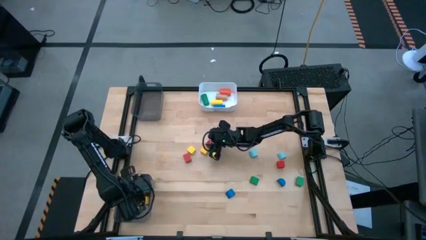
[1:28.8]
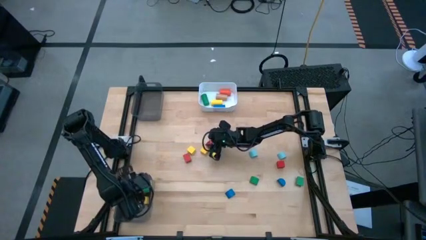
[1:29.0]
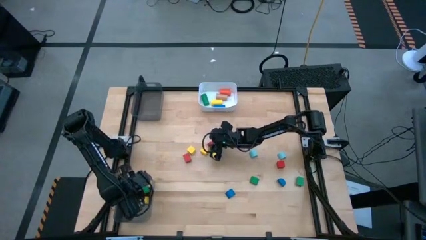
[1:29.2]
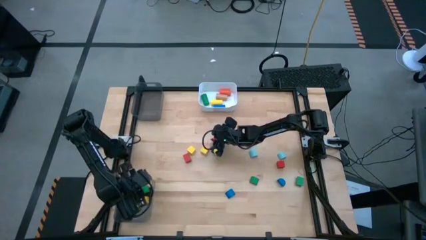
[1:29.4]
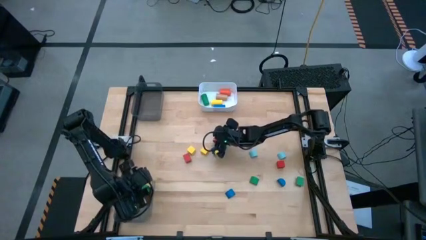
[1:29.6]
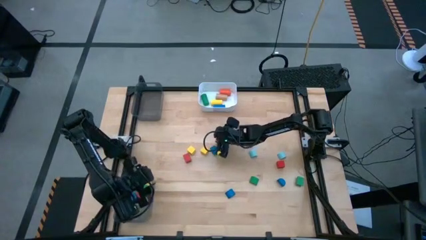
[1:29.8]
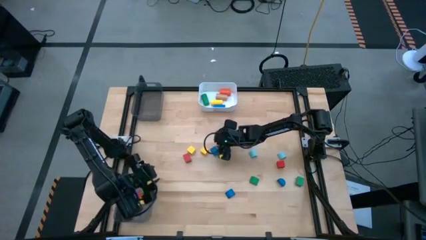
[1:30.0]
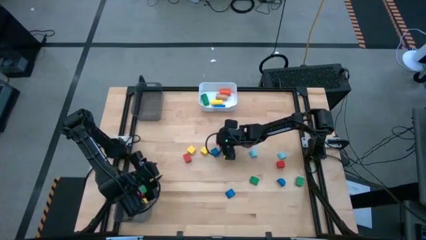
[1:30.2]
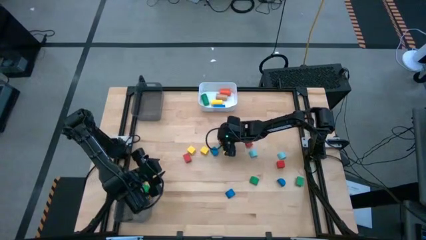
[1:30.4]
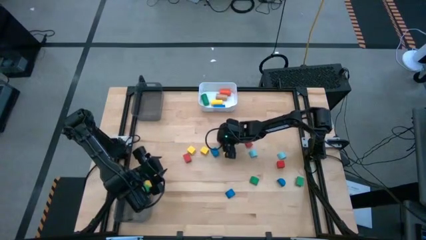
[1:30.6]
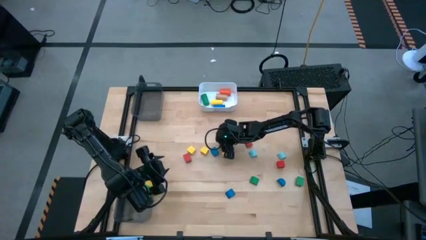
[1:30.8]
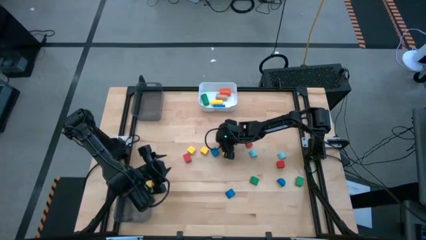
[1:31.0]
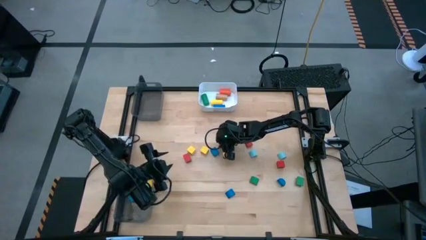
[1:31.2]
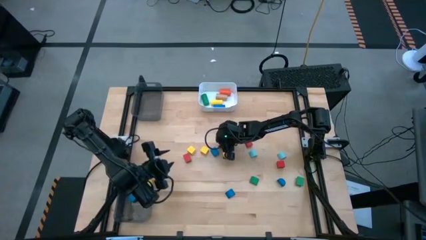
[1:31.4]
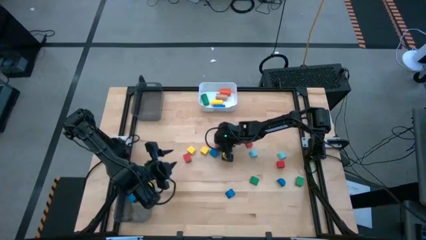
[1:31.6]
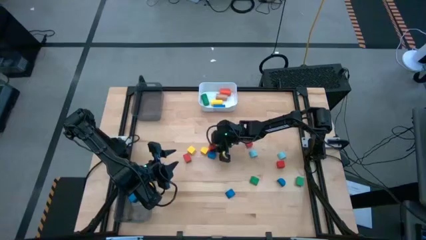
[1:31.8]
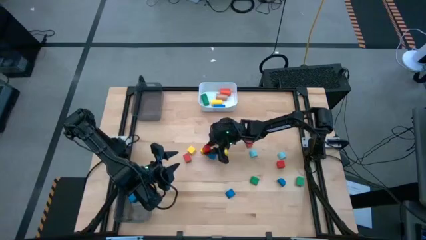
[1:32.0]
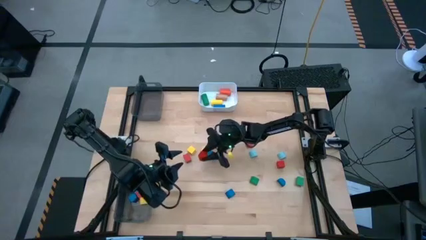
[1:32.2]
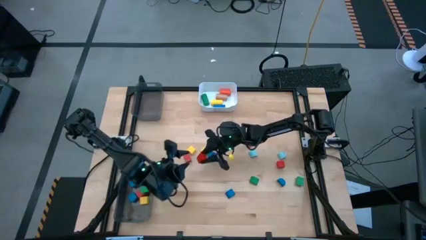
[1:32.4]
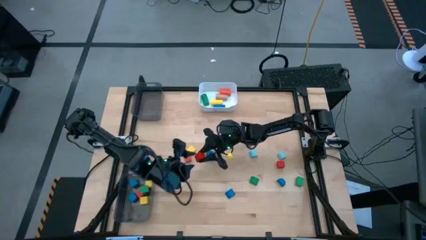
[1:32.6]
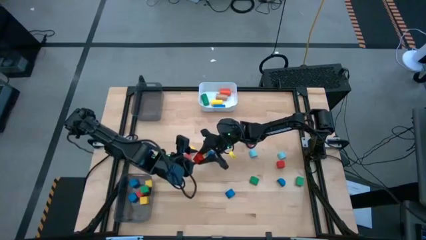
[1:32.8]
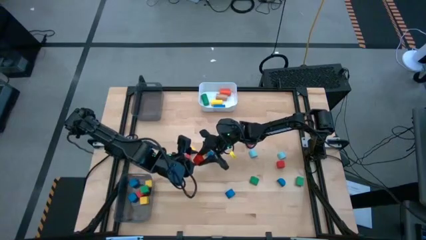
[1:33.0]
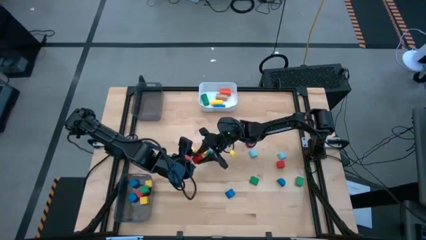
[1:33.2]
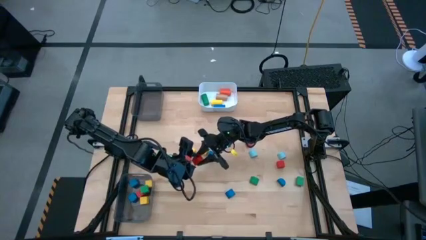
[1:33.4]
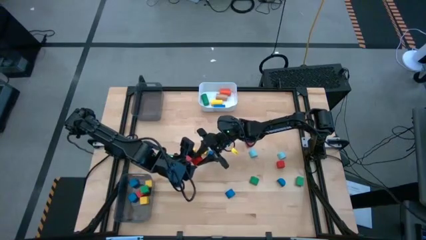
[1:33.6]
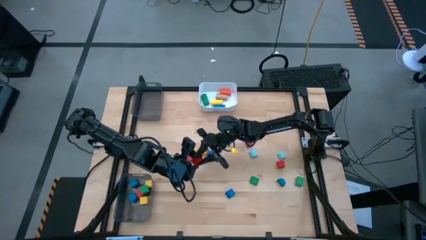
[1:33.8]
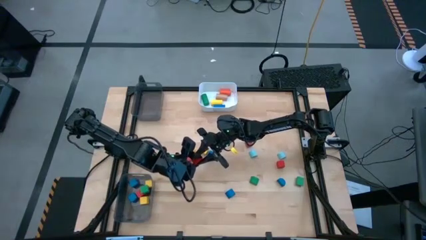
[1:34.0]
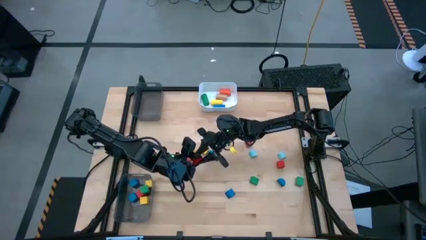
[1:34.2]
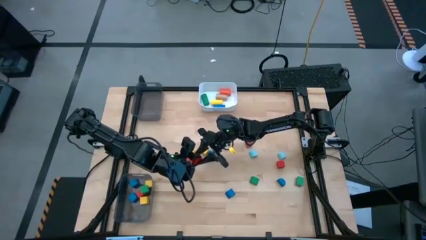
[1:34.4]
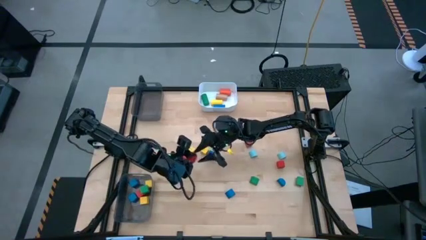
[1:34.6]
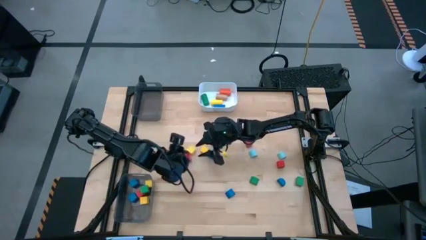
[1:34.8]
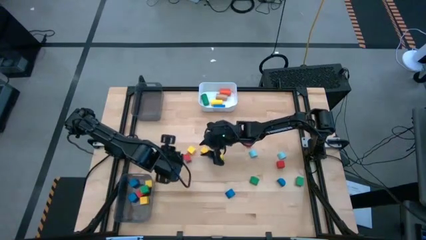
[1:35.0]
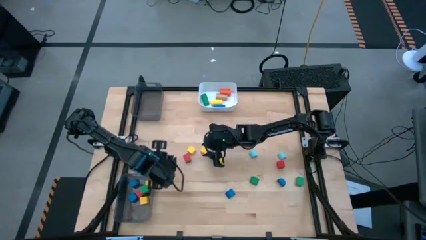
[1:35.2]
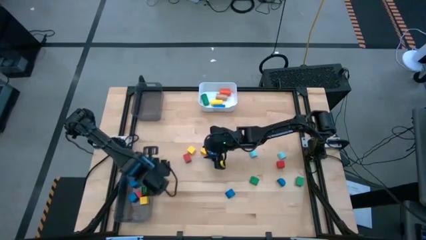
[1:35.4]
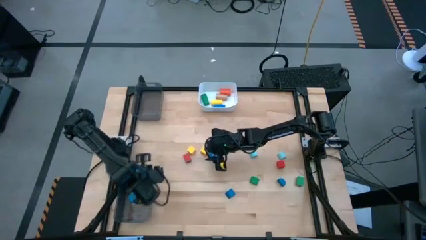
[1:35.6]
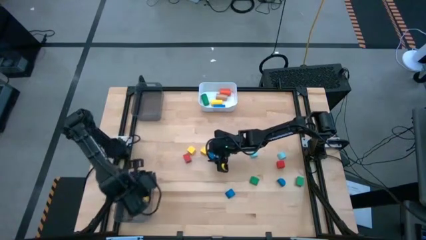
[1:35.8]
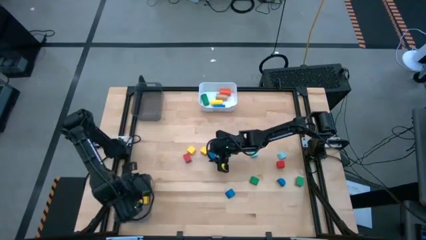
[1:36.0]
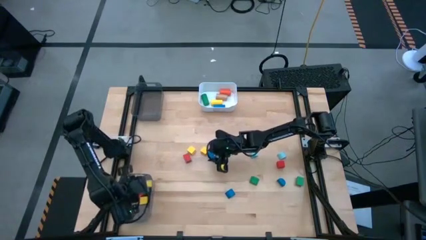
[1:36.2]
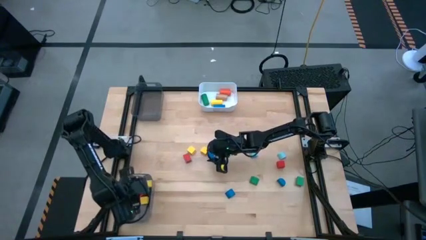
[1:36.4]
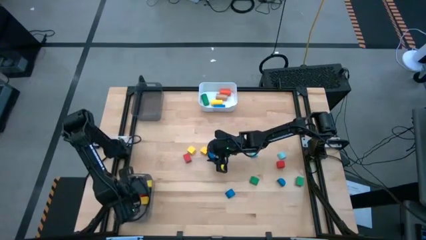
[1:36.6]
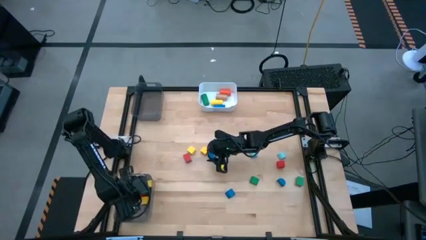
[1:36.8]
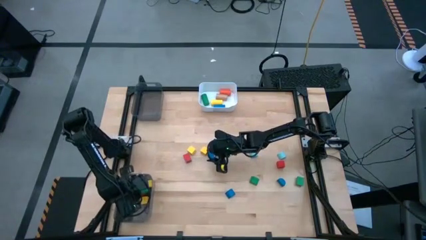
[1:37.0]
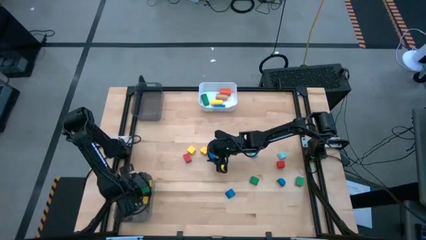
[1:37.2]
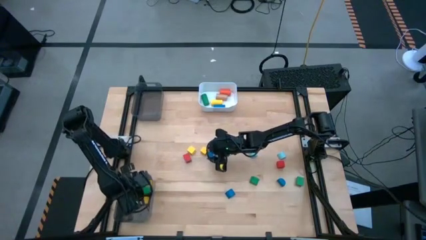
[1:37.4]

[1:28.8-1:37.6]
Task: Sort blocks by size
Put the red square block into the bottom black bin

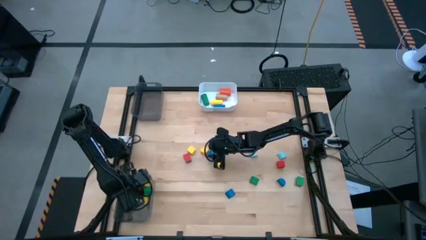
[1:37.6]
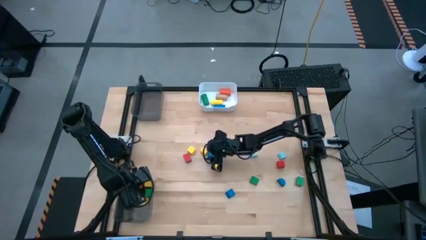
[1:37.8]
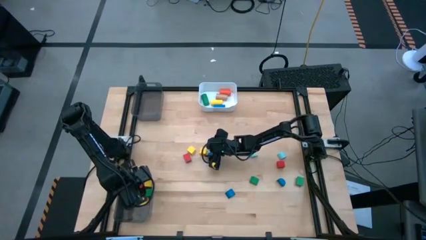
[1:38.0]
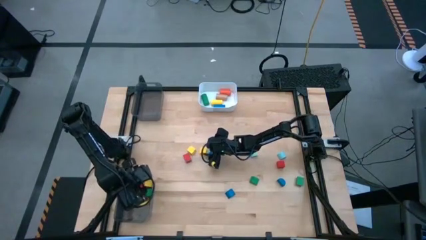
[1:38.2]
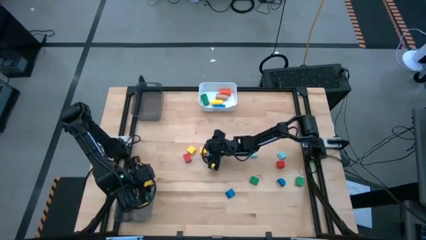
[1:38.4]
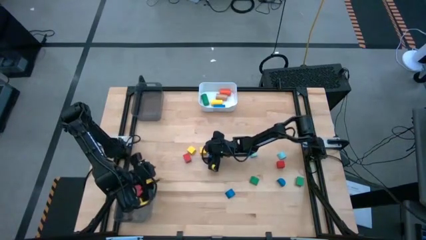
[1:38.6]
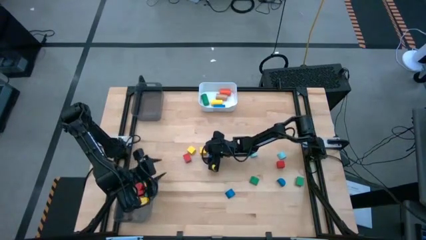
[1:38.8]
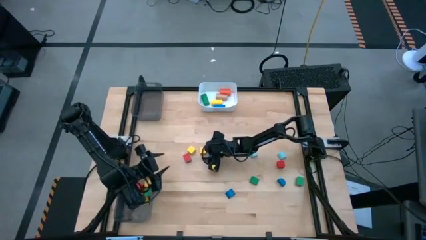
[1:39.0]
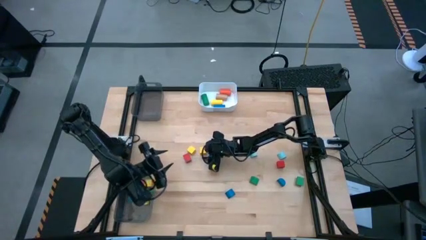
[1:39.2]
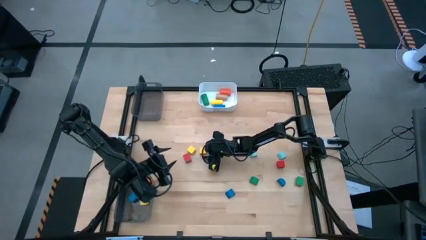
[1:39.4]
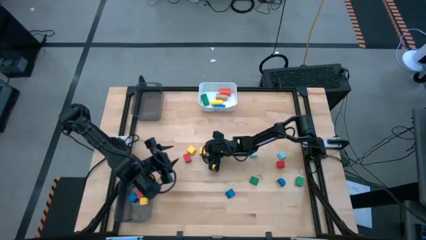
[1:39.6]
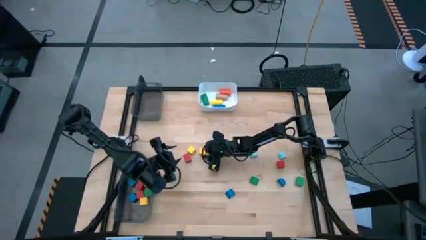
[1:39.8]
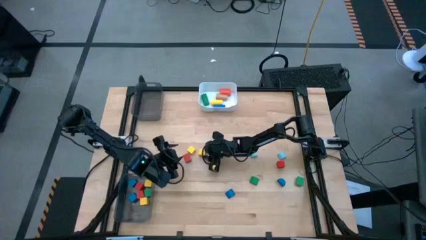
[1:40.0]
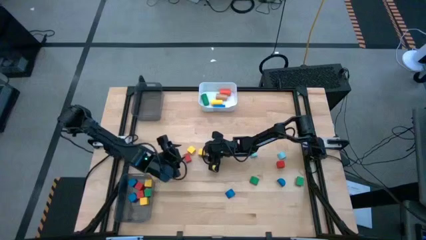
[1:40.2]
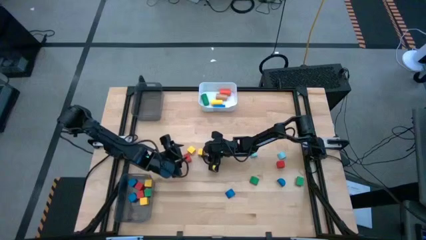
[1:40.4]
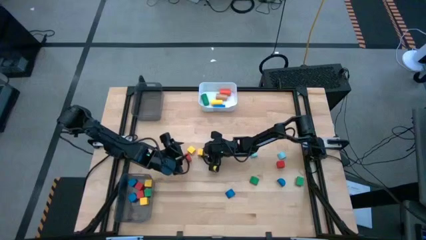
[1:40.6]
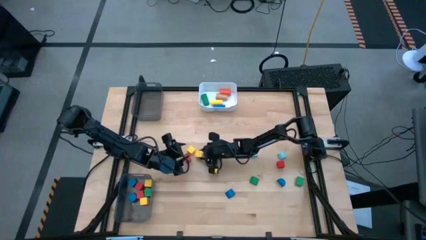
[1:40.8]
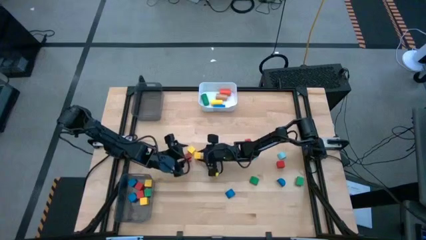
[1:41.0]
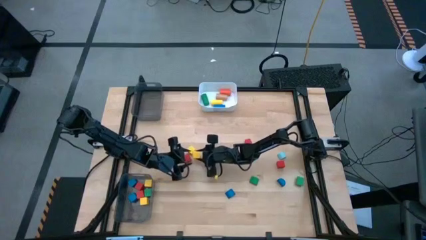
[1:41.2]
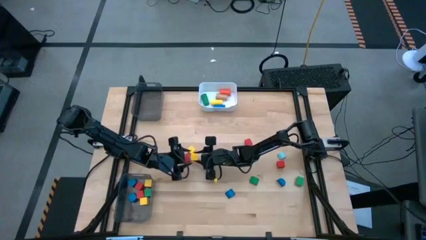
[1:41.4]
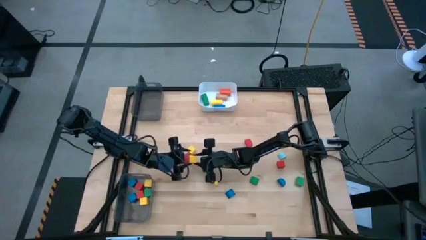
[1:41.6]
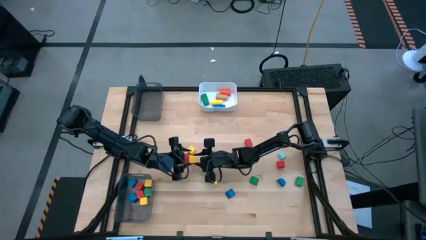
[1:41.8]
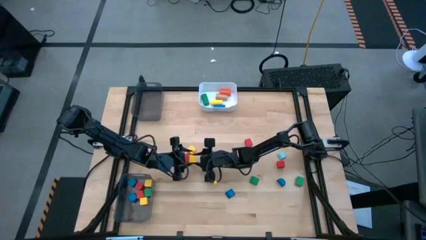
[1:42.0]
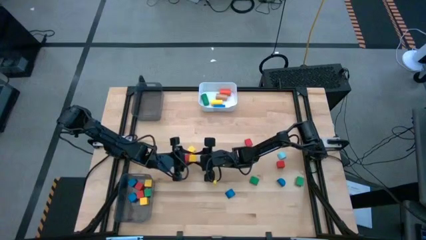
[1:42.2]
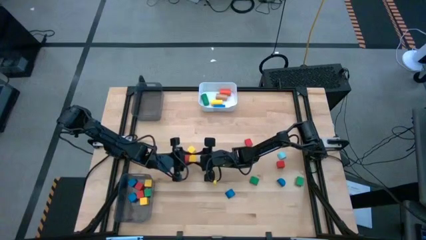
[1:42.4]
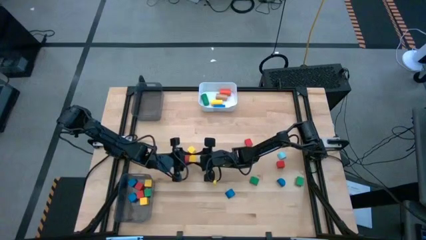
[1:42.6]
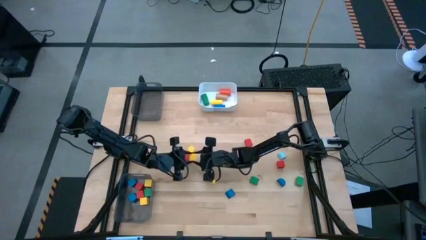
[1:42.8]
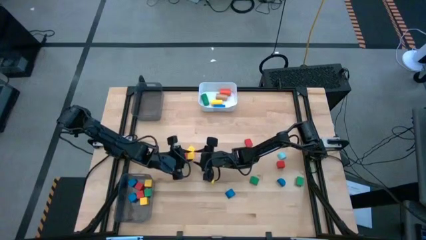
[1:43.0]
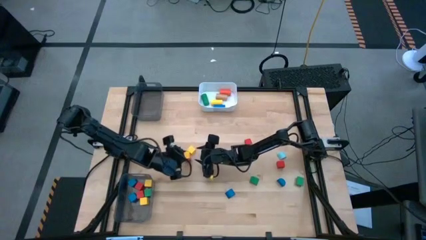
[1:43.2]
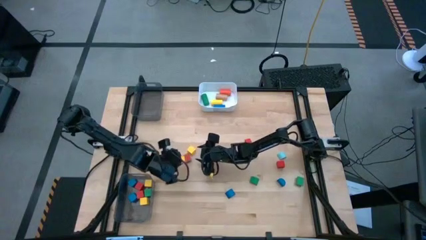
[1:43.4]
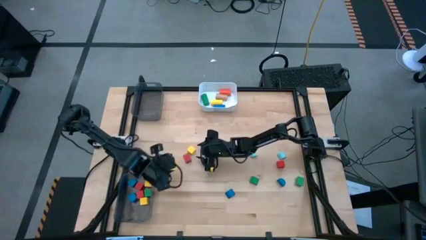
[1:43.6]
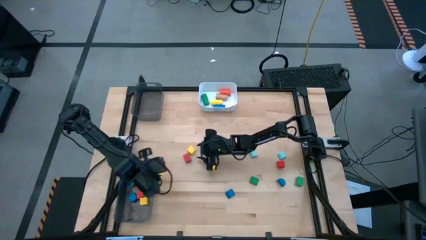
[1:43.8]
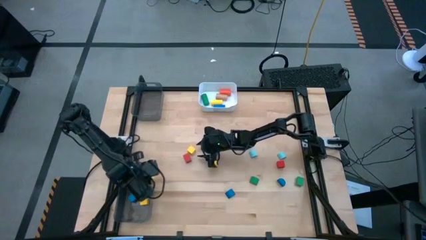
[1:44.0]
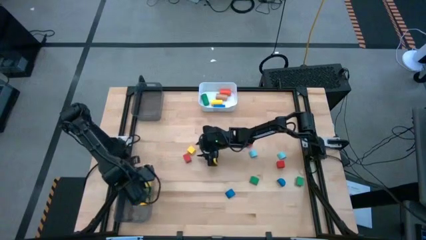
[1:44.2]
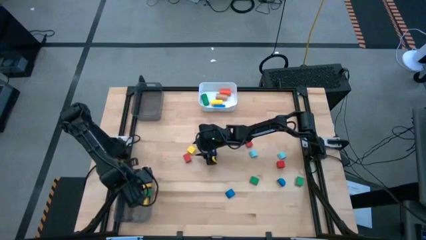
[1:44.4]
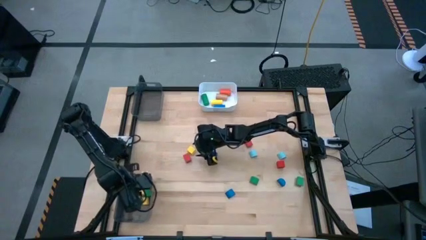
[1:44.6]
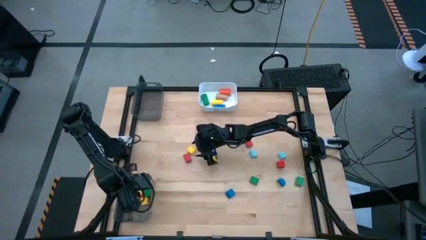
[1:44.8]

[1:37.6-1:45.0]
Put the yellow square block into the bottom black bin
